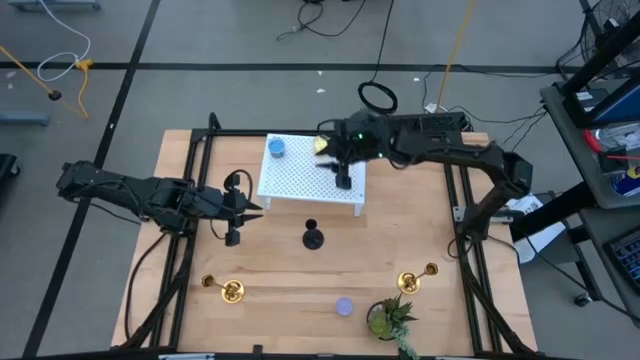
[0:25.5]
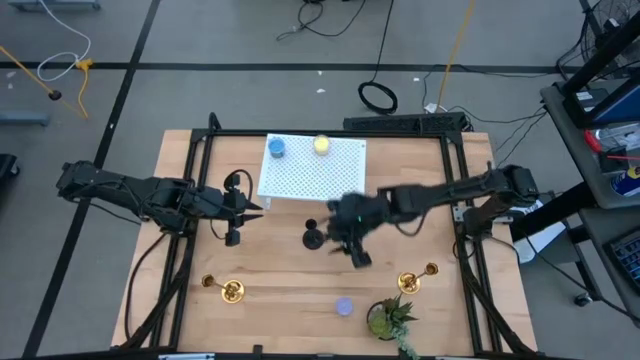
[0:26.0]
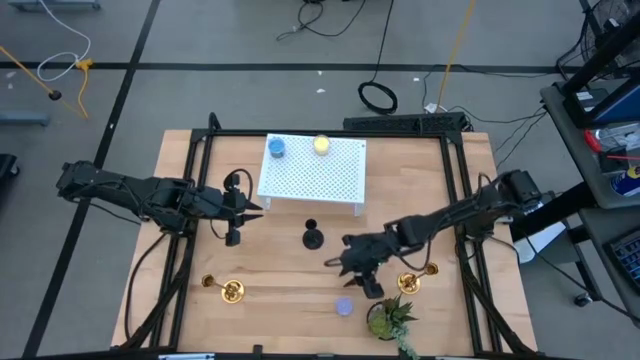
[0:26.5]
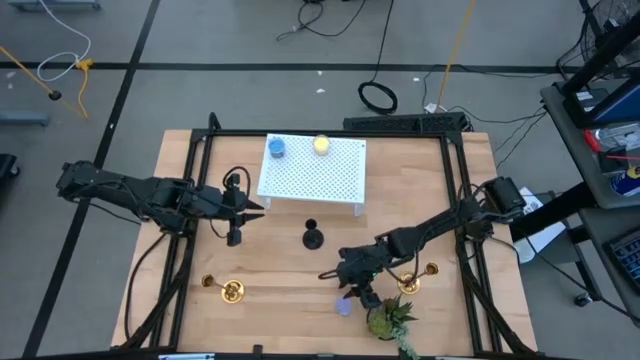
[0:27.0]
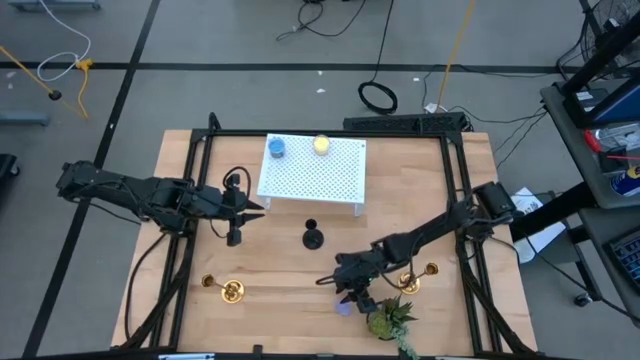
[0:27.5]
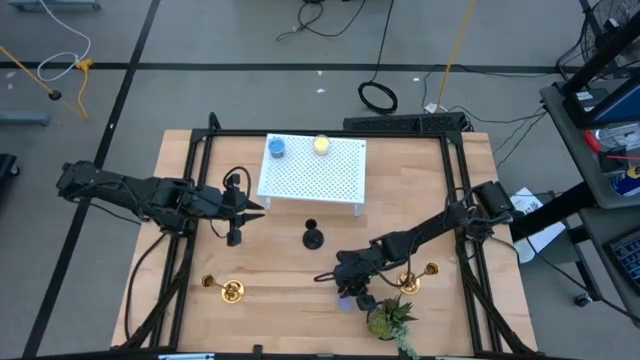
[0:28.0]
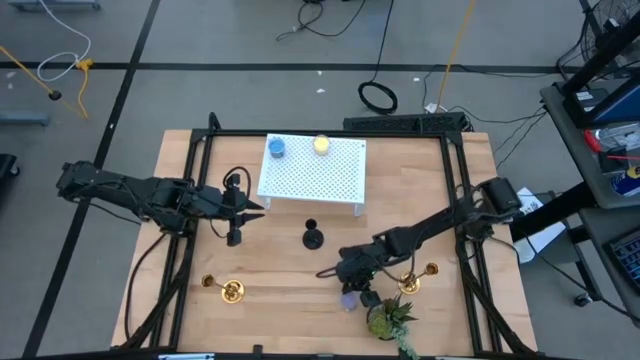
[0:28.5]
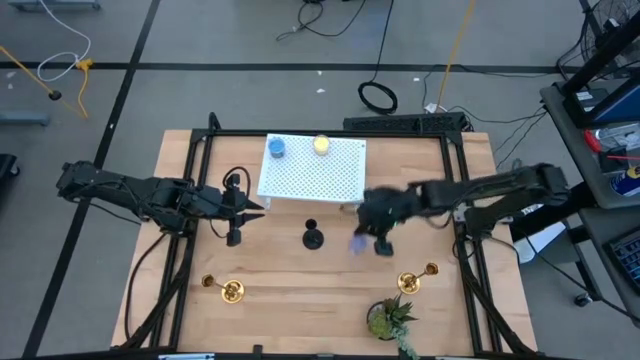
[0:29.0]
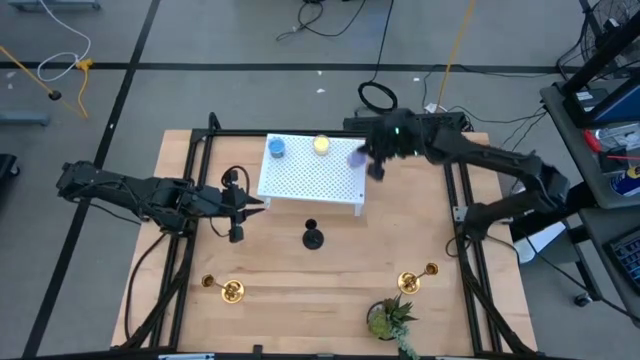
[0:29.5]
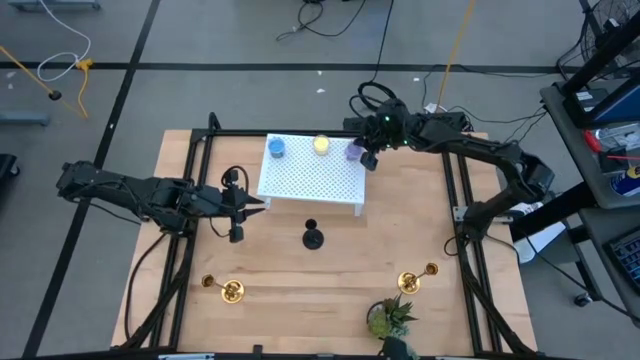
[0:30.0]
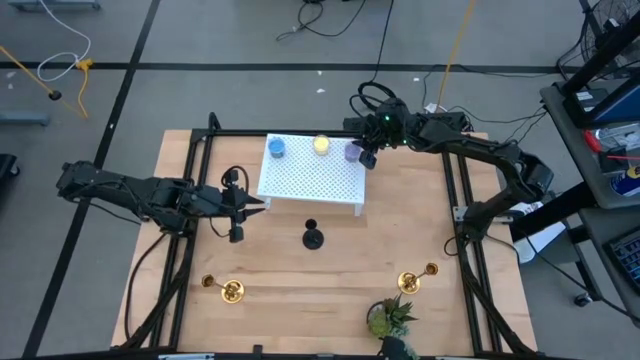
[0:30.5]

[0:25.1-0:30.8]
Task: Pick & Place candle stick holders
Put the violet scented candle on the shelf

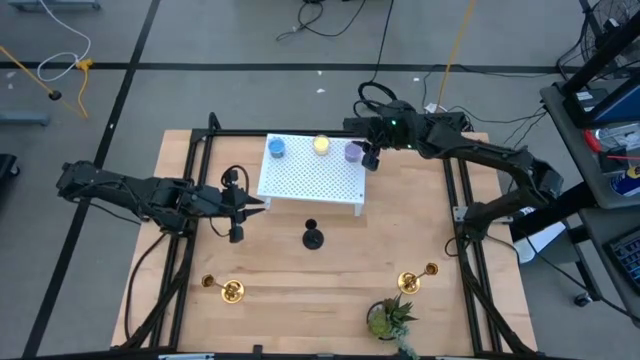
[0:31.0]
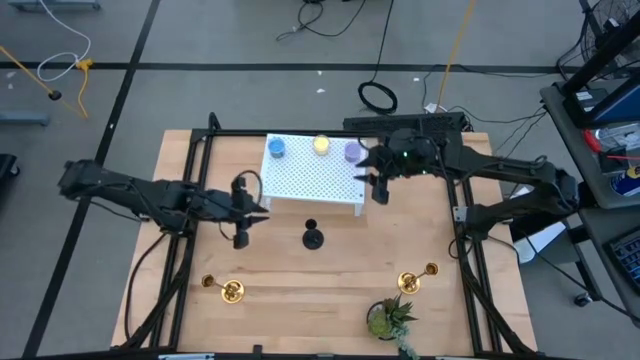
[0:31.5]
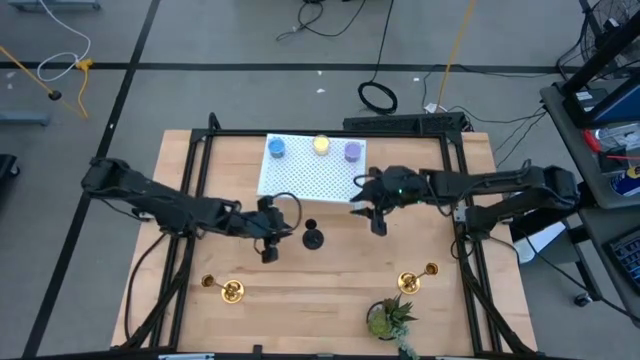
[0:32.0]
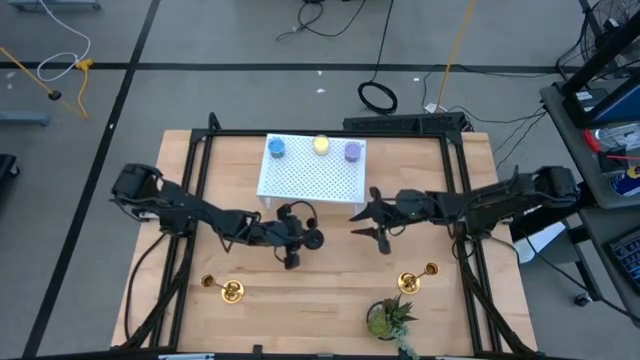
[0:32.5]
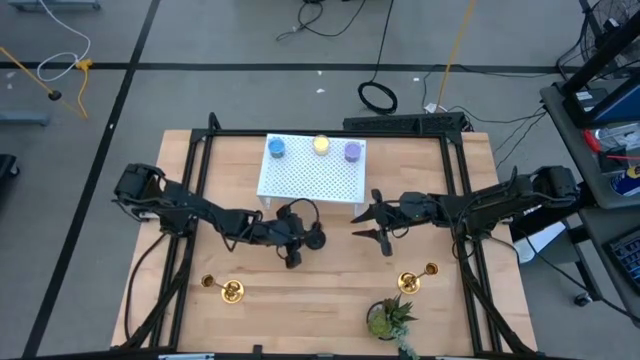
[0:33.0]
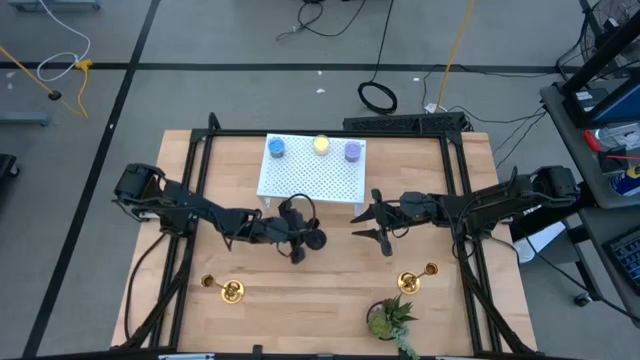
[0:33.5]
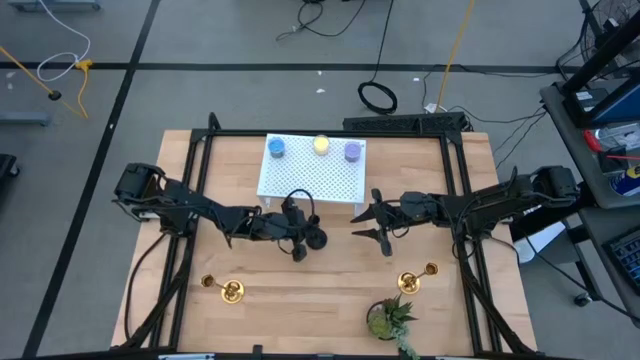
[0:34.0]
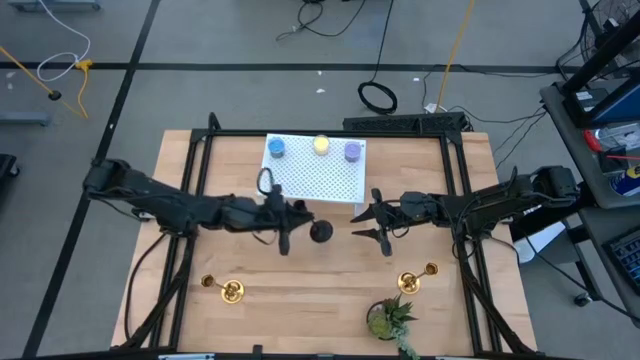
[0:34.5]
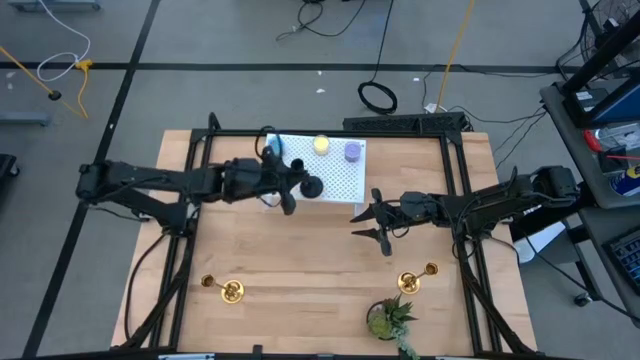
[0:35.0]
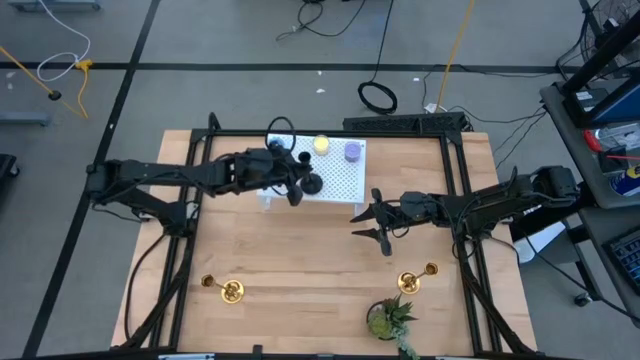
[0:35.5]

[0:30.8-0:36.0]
Put the black candle holder on the shelf

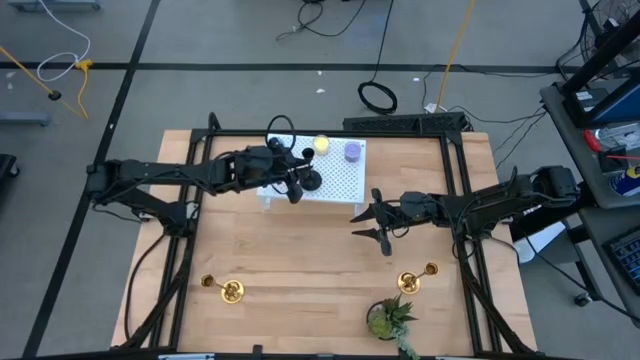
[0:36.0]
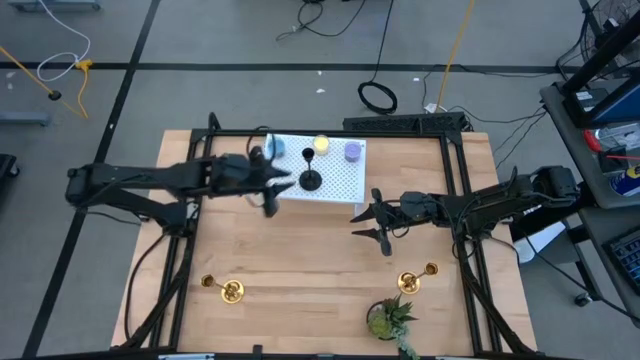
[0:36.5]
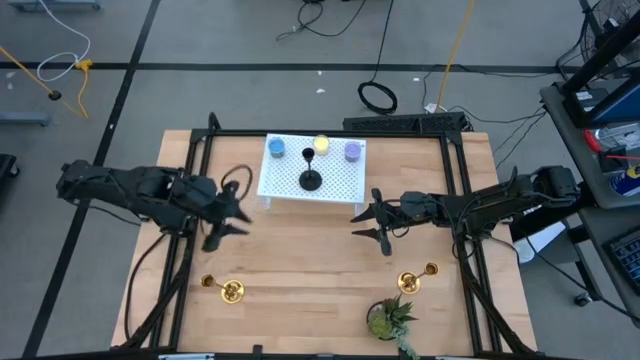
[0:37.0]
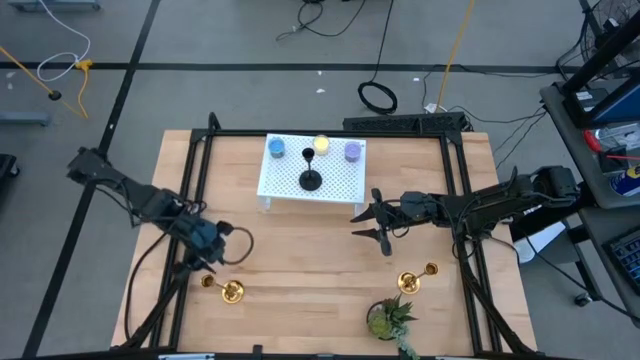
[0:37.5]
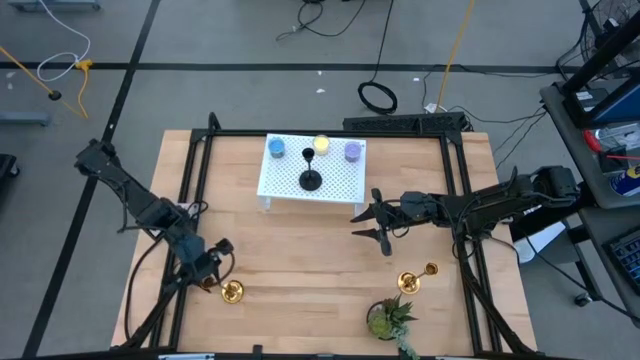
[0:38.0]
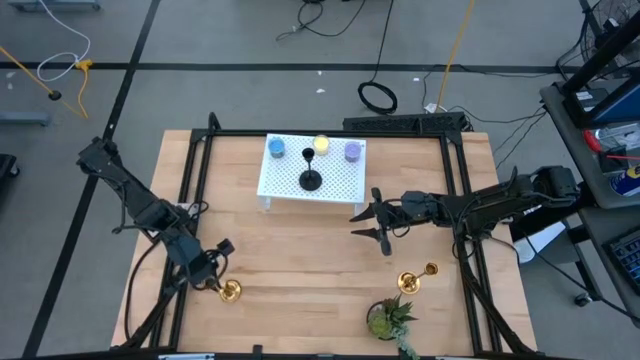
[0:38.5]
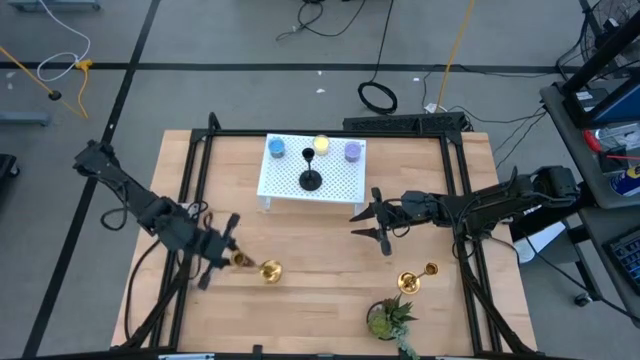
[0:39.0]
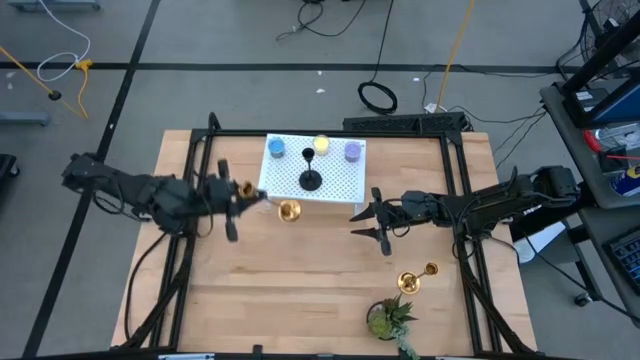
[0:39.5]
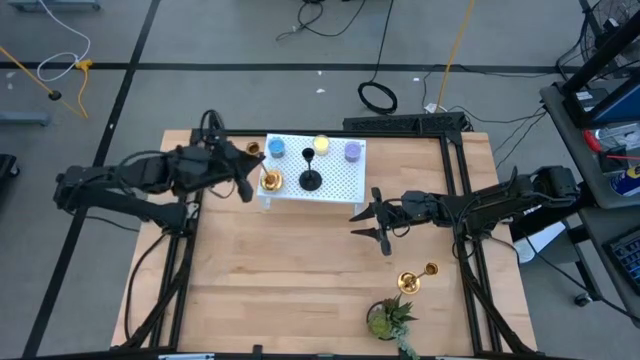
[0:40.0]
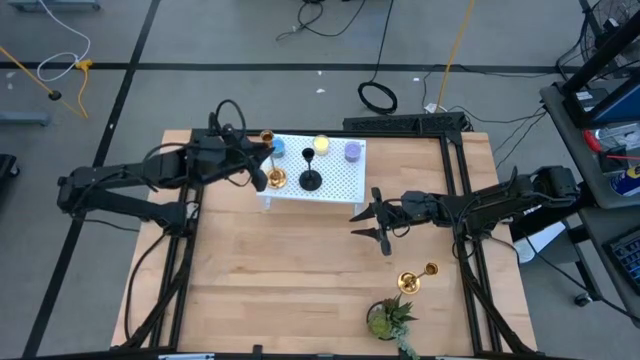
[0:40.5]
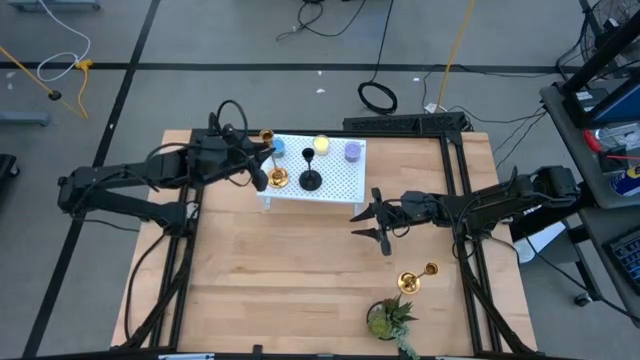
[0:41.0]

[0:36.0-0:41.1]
Put the left gold candle holder on the shelf

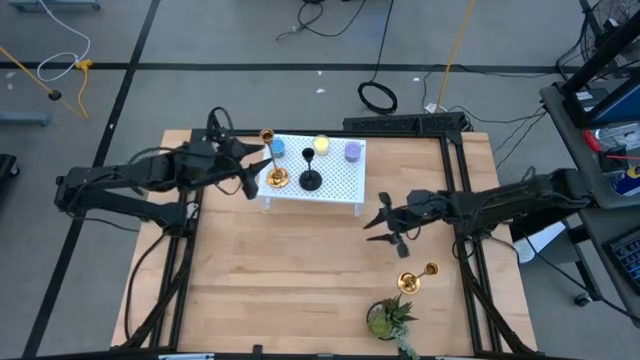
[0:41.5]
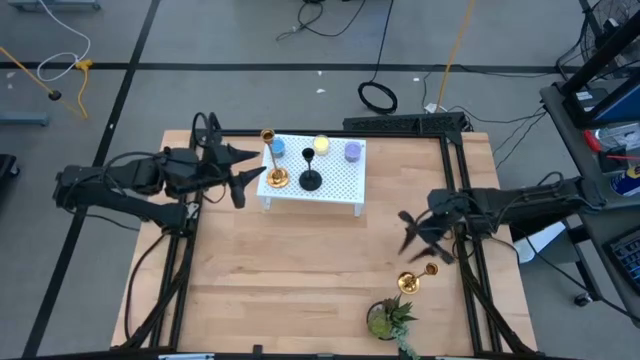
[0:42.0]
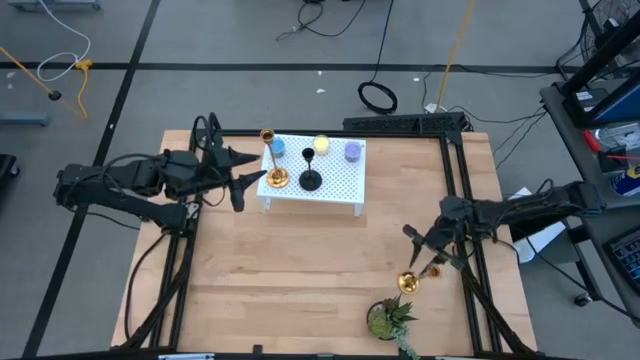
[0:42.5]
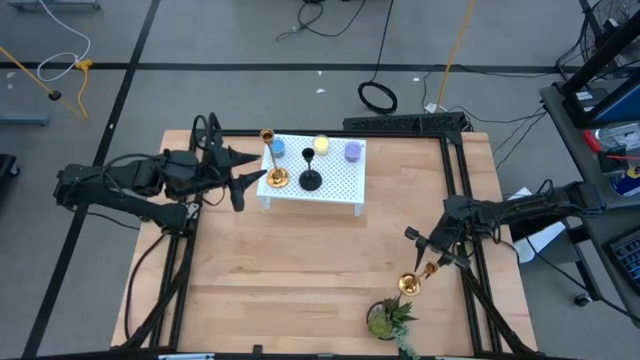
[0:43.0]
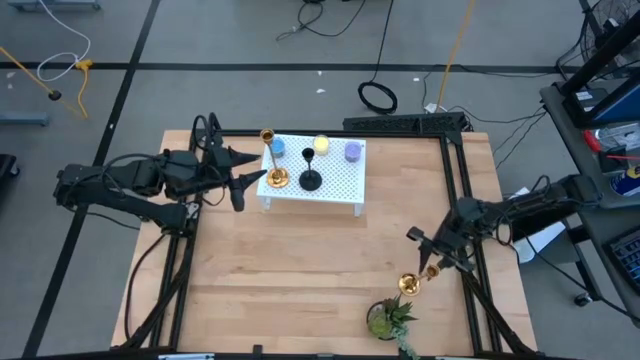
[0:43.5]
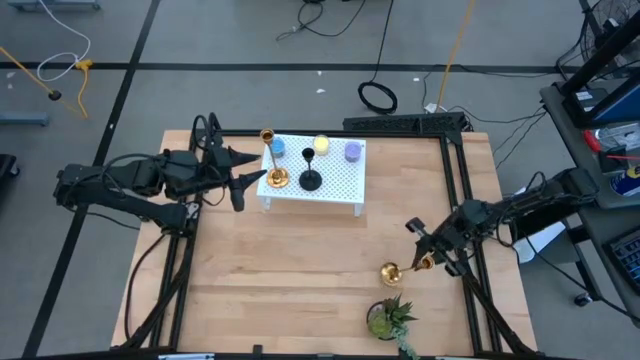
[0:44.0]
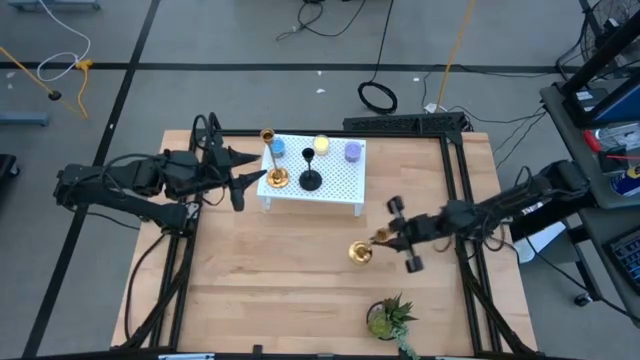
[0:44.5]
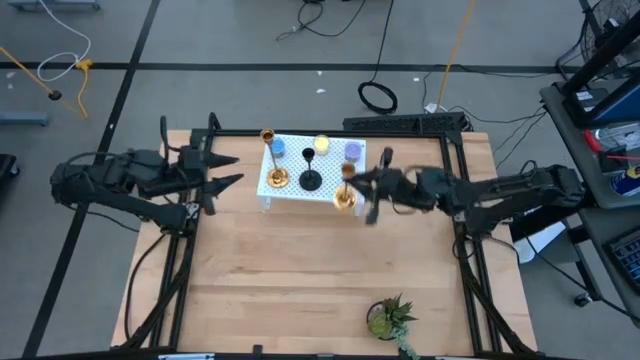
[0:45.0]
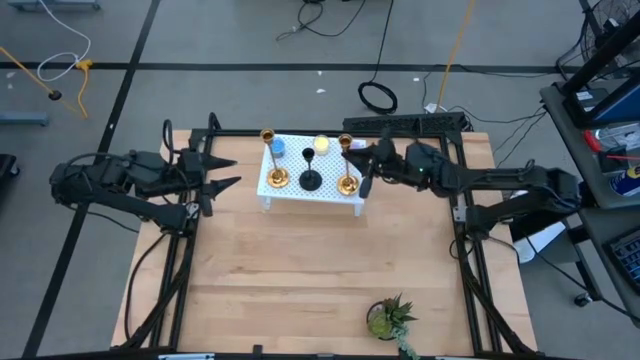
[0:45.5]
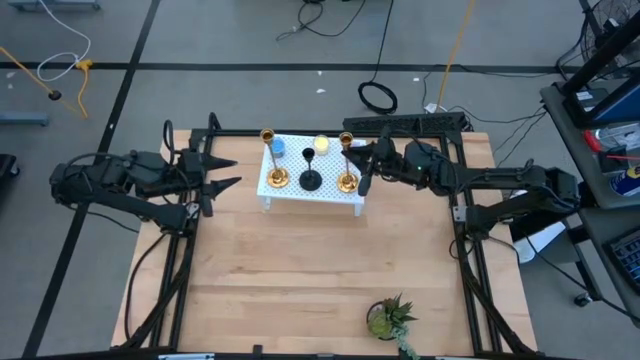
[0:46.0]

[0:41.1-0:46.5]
Put the gold candle holder on the shelf
